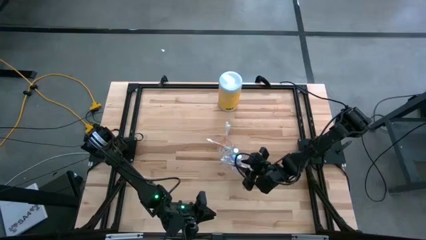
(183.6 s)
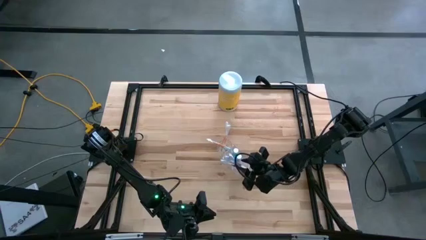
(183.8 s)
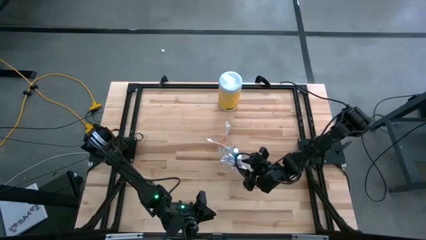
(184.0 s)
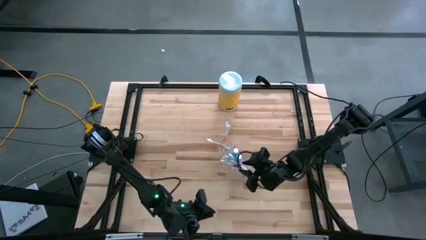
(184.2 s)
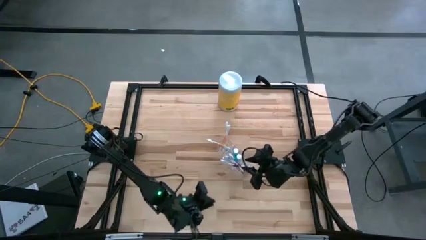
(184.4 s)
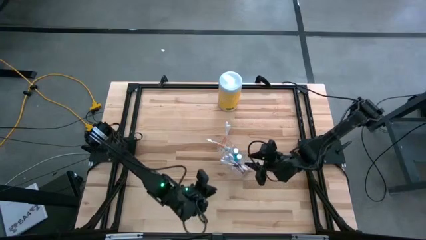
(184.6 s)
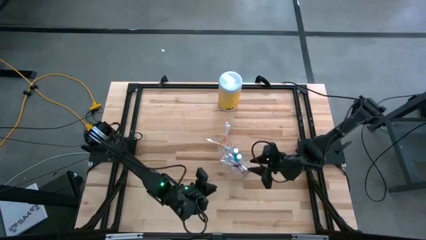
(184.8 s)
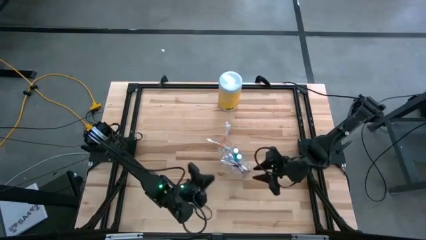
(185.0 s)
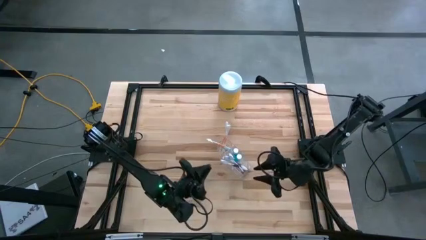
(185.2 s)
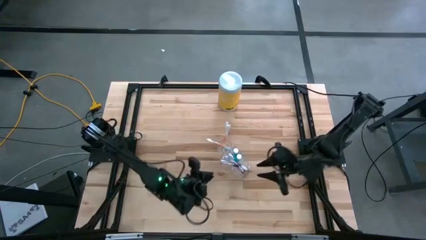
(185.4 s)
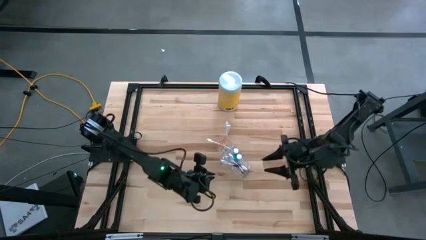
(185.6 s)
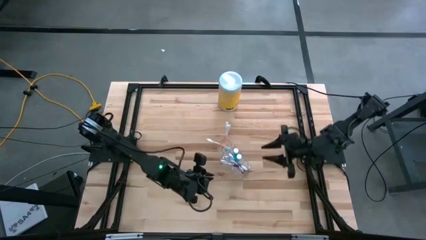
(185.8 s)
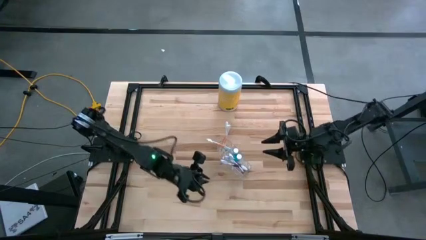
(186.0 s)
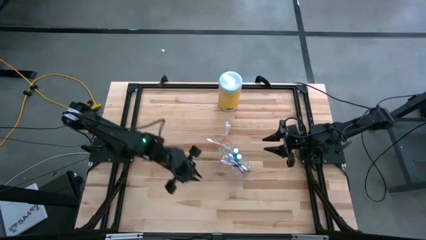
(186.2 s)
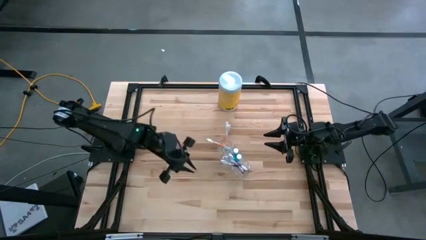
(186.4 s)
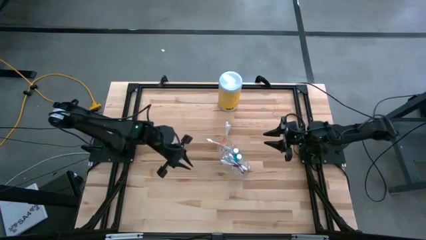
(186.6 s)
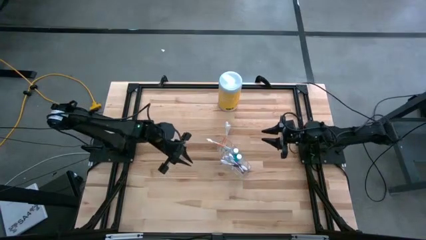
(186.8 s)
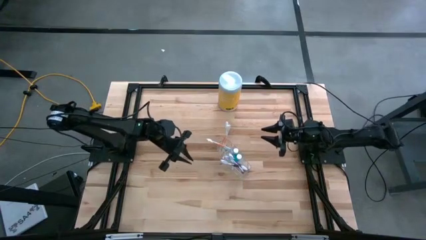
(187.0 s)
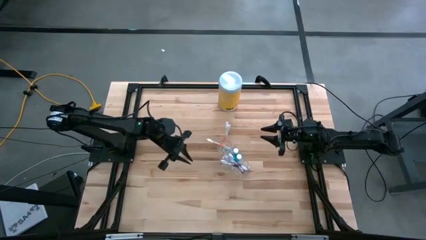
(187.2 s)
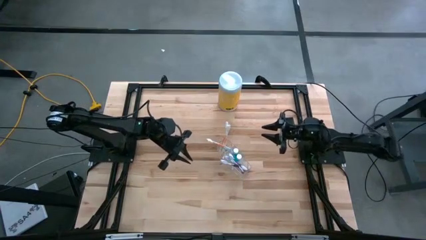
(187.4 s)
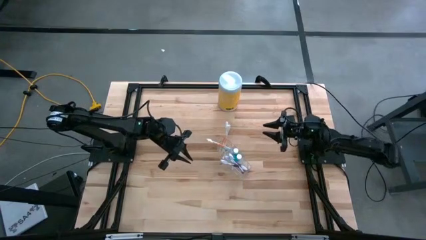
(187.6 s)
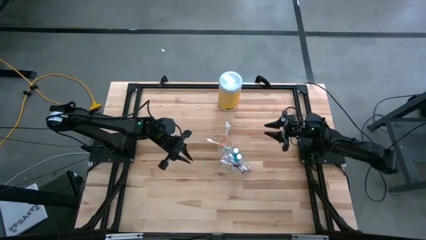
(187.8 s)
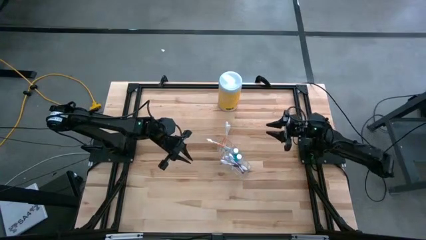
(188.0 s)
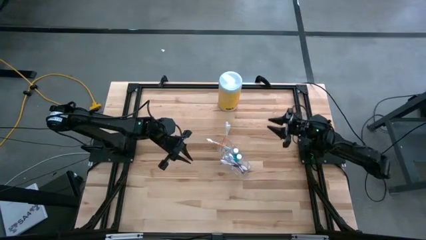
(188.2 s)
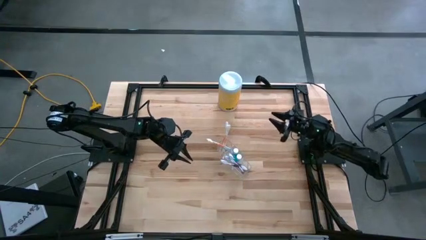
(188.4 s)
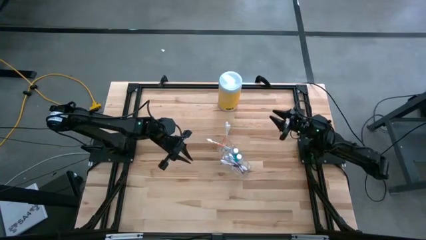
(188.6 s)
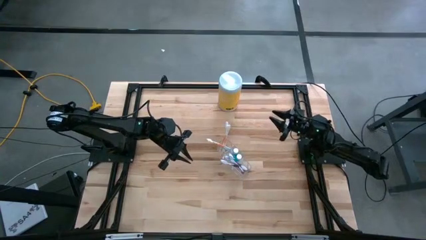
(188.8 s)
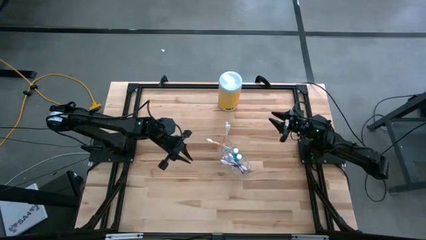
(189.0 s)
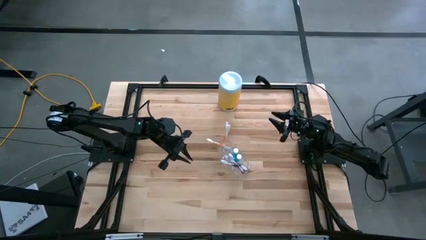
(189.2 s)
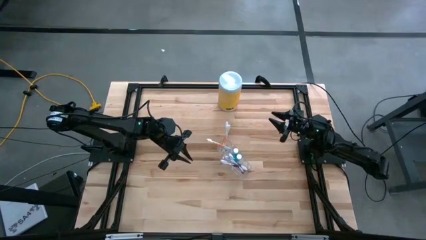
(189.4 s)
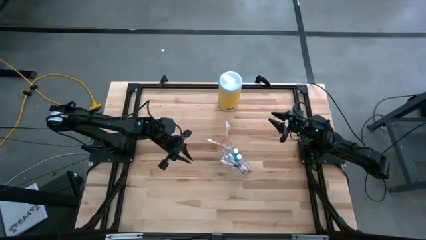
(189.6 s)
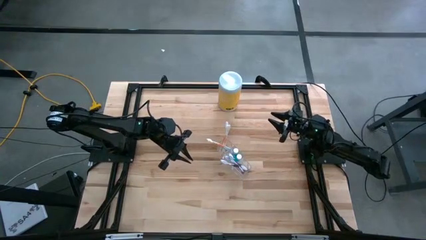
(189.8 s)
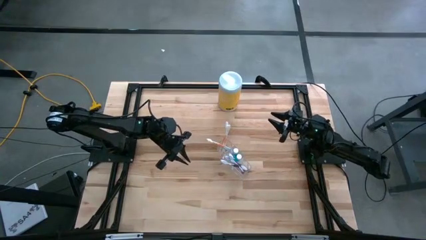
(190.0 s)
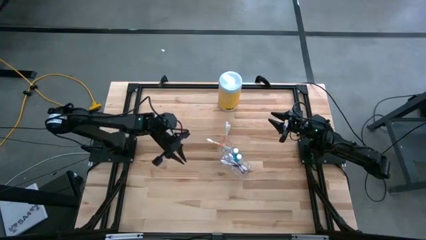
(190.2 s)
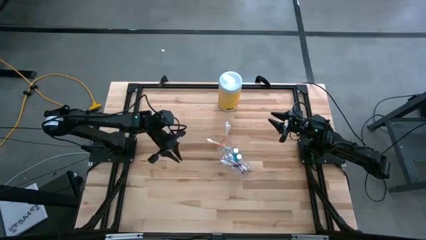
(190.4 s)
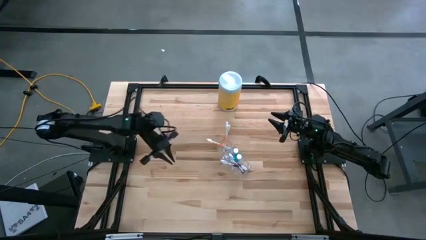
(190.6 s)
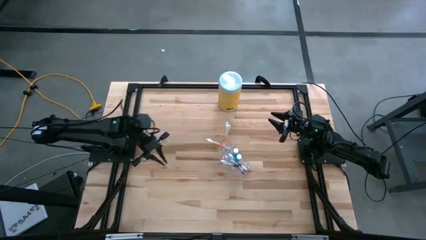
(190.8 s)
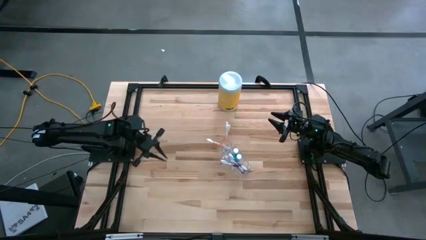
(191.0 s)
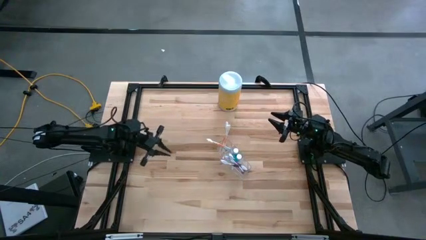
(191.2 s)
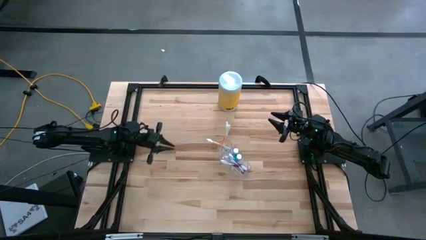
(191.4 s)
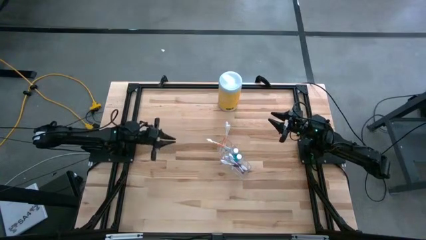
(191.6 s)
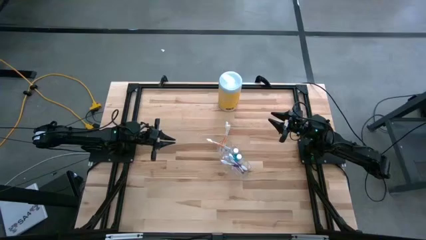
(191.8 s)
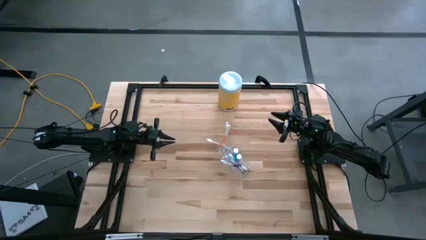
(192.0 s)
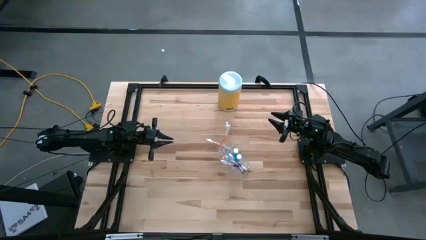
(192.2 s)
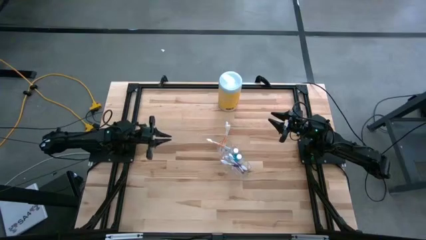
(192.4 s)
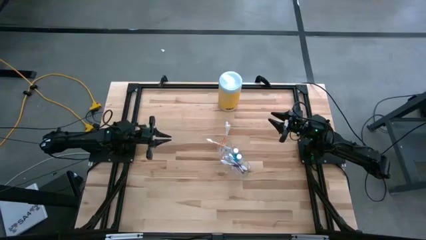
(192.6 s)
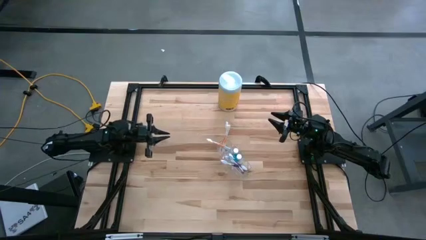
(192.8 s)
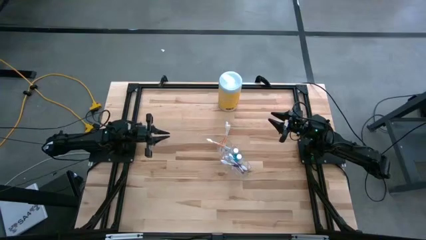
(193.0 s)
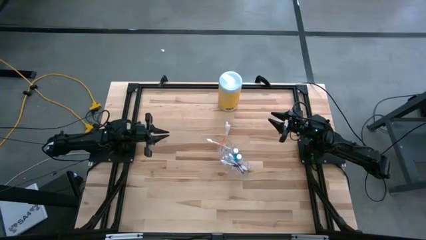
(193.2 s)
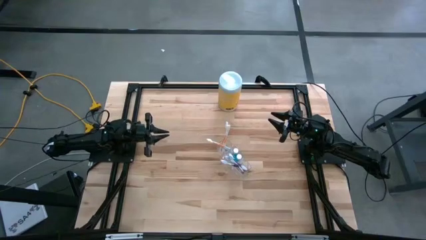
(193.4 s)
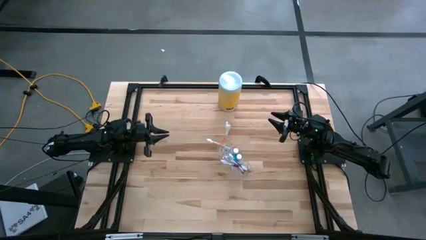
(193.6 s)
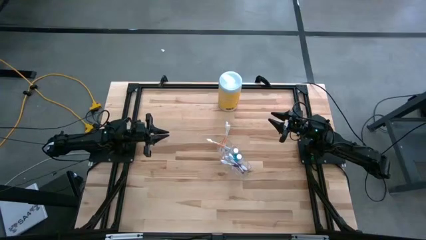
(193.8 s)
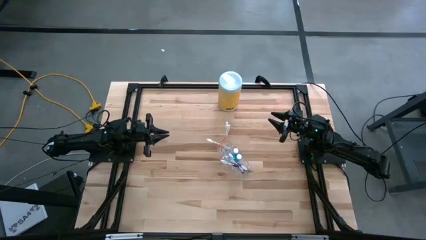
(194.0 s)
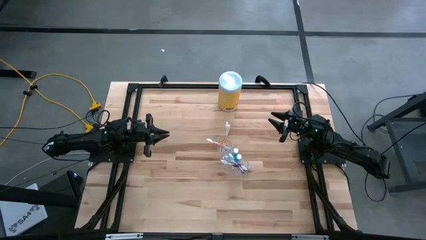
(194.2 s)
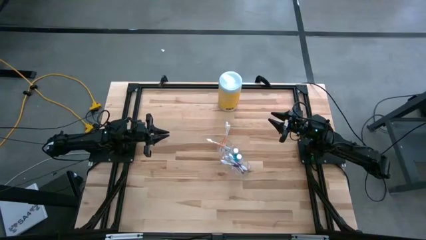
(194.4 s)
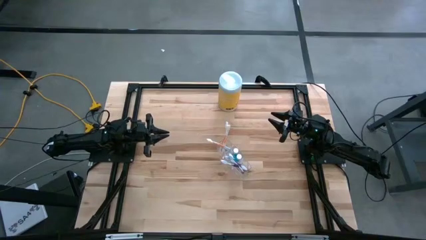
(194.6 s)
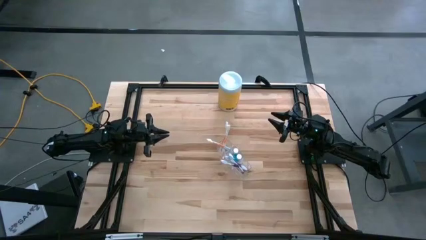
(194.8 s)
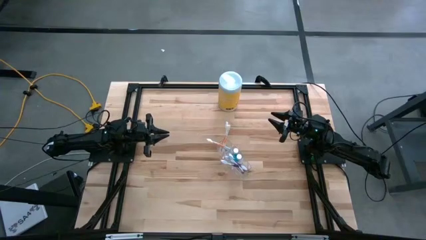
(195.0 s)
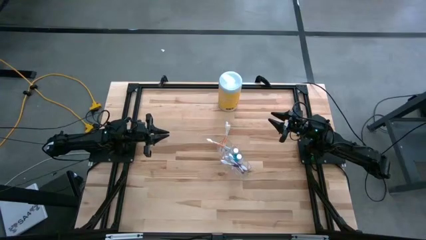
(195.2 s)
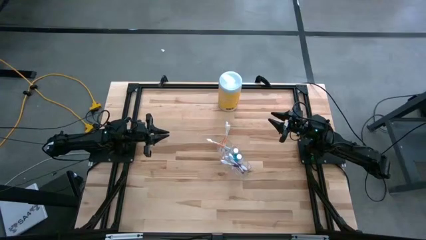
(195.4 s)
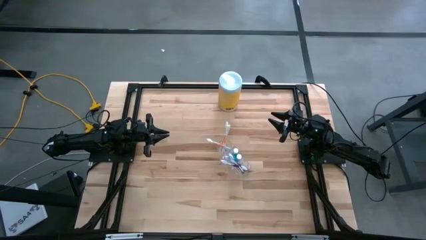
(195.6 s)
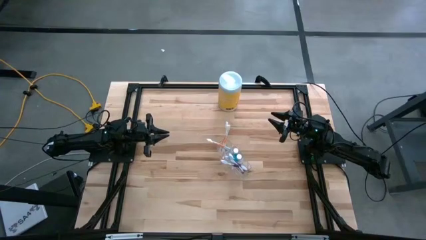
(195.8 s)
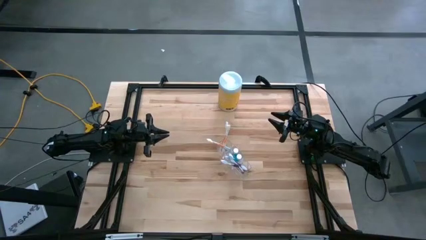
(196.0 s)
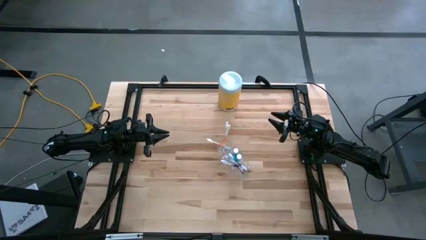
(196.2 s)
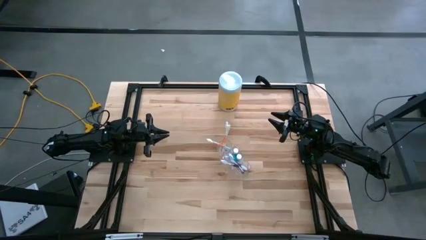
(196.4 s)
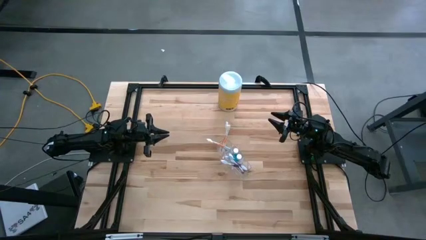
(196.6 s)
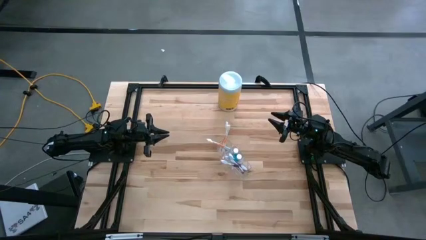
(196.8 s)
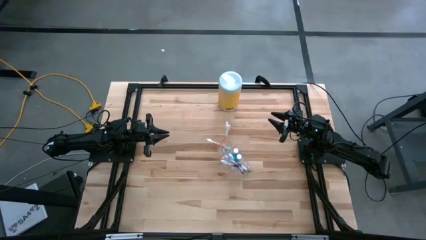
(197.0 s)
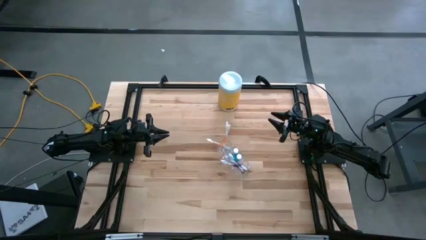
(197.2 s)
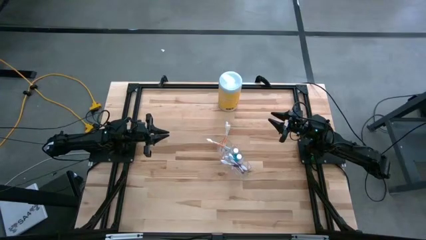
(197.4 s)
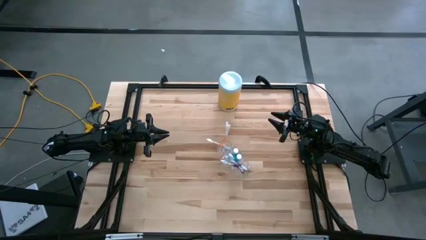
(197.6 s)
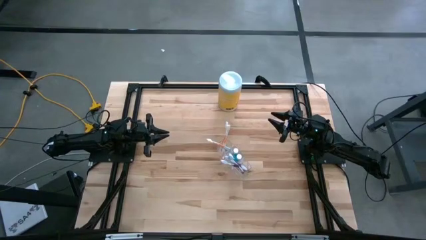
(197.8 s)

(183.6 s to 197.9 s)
Task: Pick & Place toothbrushing station
Return to Home Position
